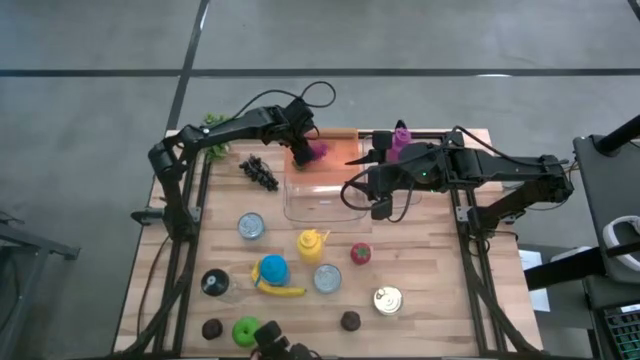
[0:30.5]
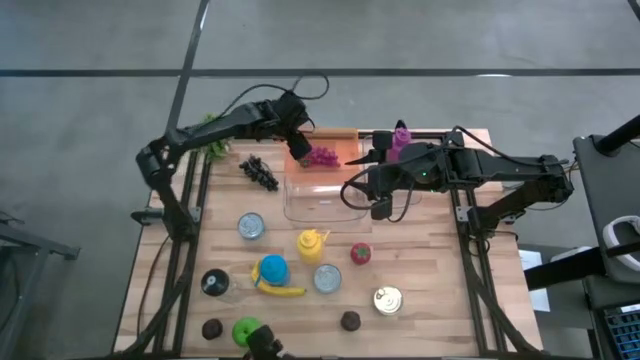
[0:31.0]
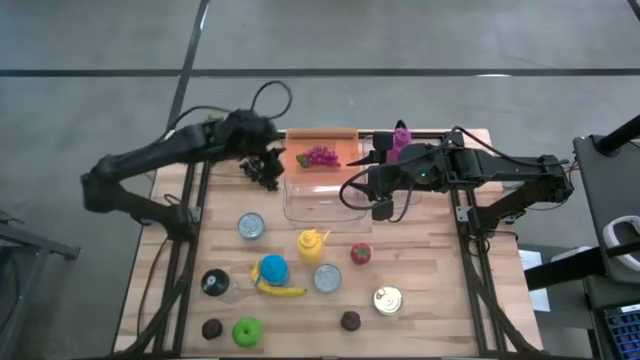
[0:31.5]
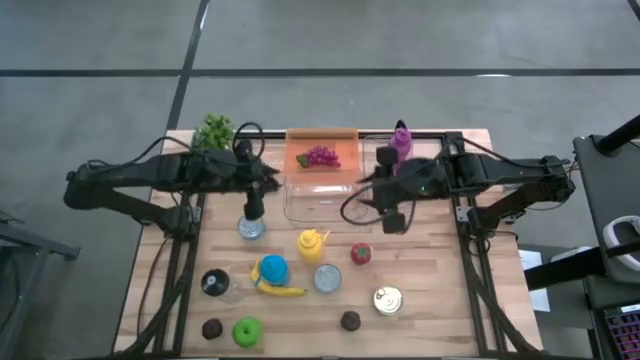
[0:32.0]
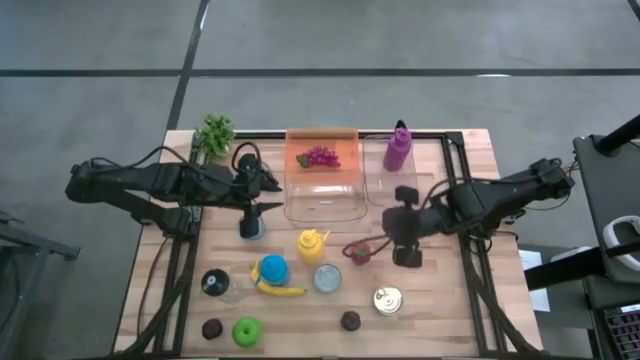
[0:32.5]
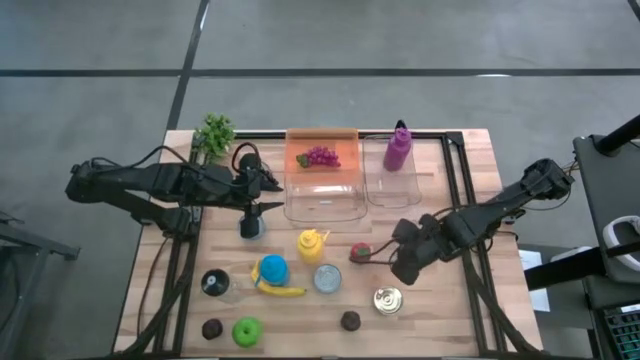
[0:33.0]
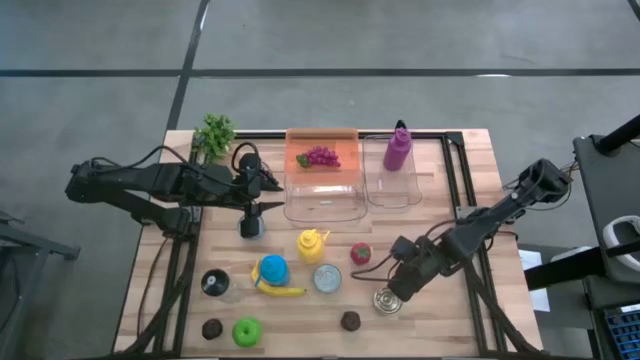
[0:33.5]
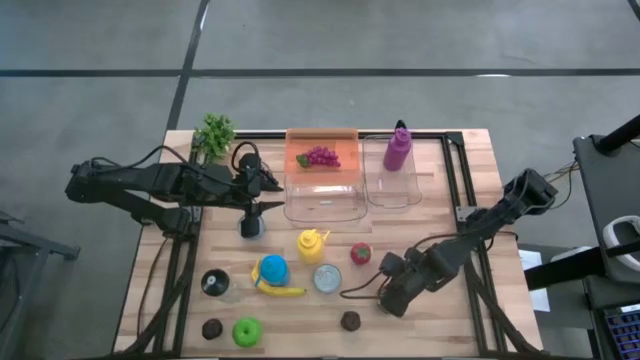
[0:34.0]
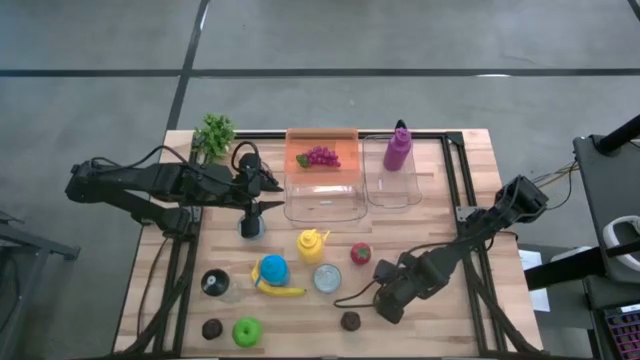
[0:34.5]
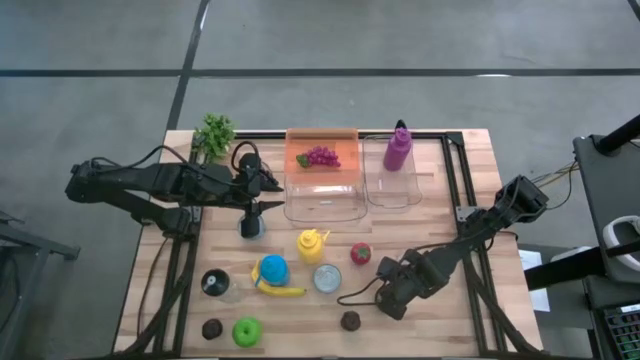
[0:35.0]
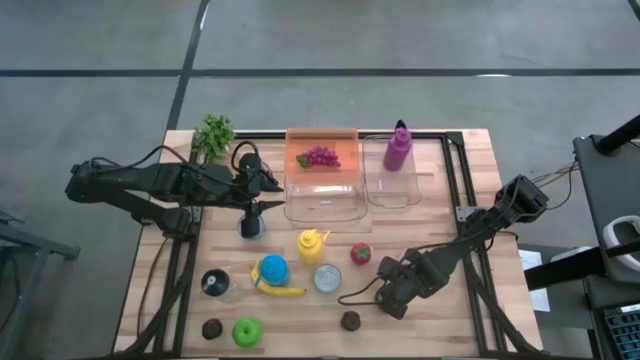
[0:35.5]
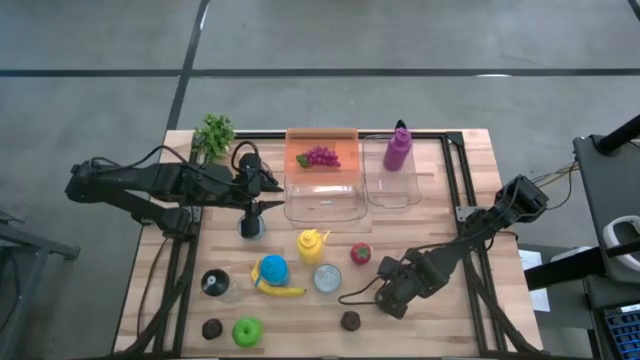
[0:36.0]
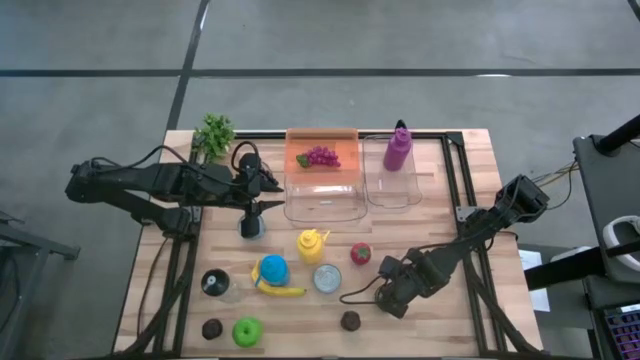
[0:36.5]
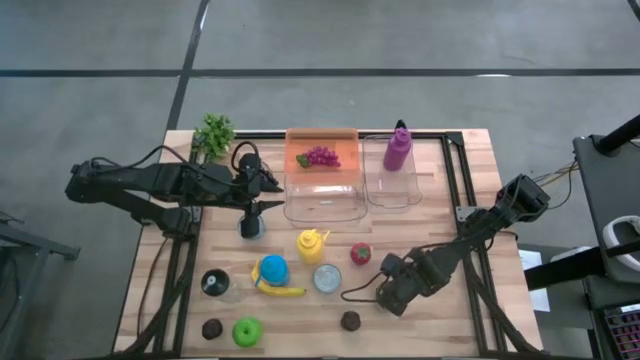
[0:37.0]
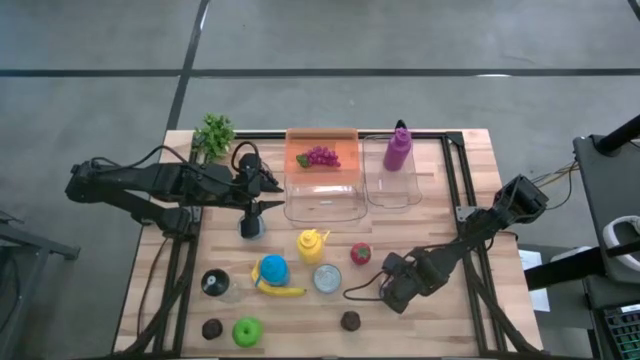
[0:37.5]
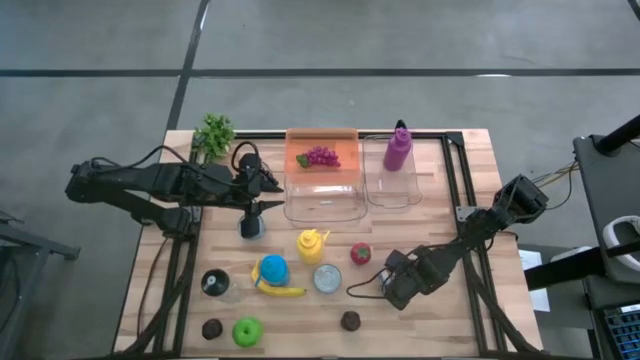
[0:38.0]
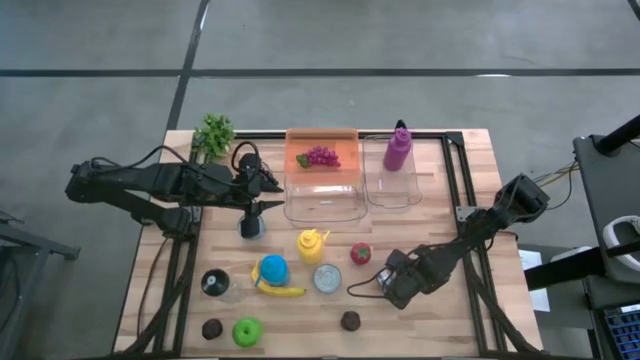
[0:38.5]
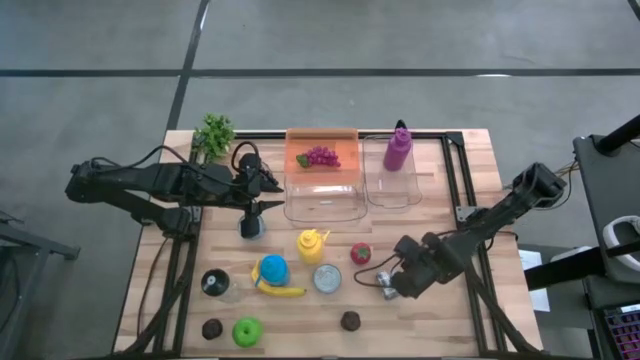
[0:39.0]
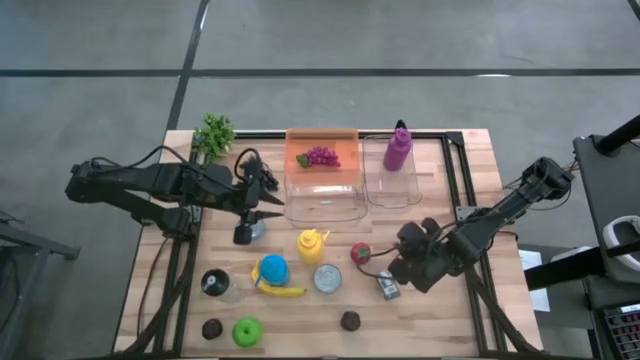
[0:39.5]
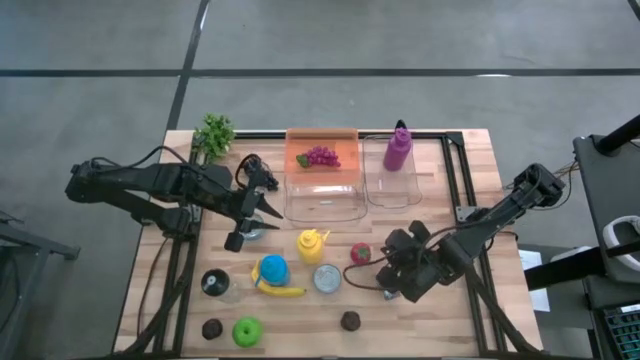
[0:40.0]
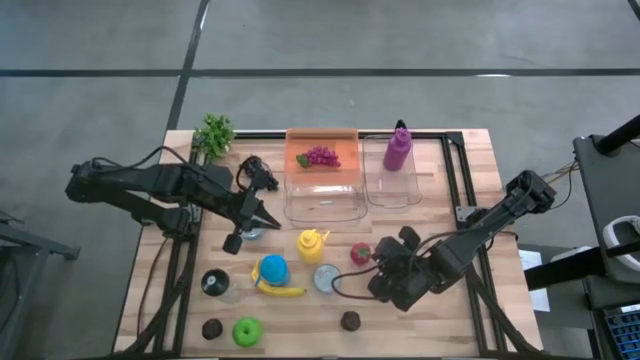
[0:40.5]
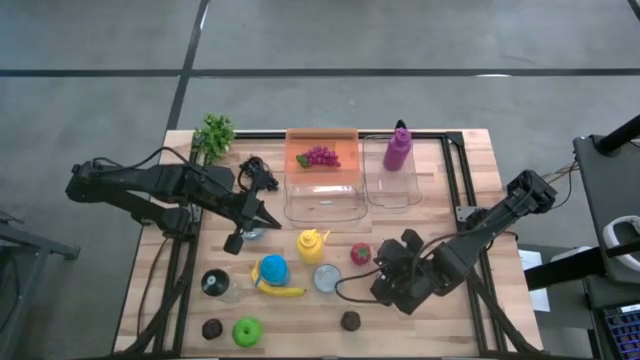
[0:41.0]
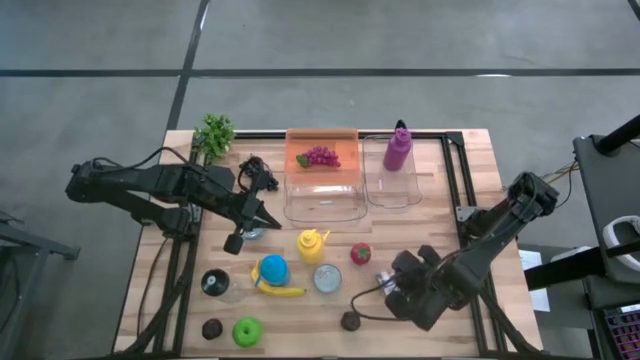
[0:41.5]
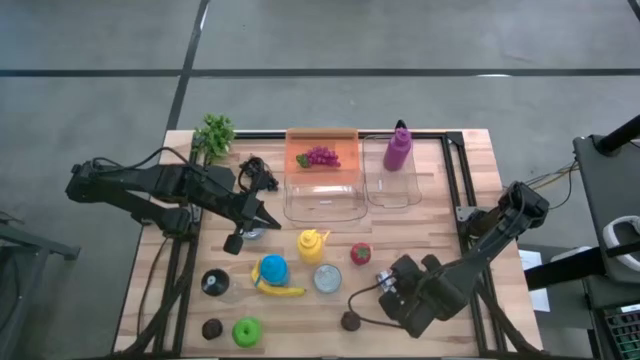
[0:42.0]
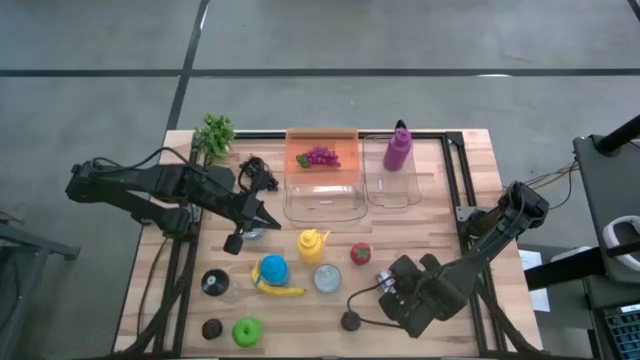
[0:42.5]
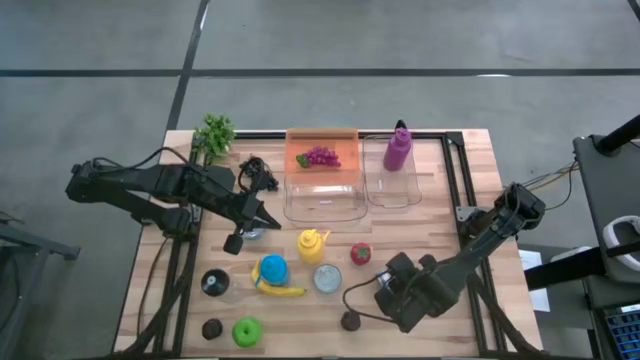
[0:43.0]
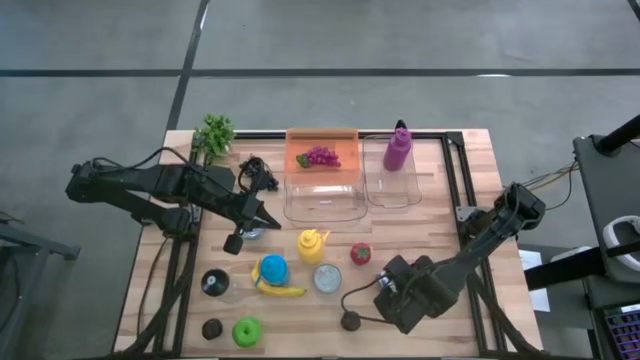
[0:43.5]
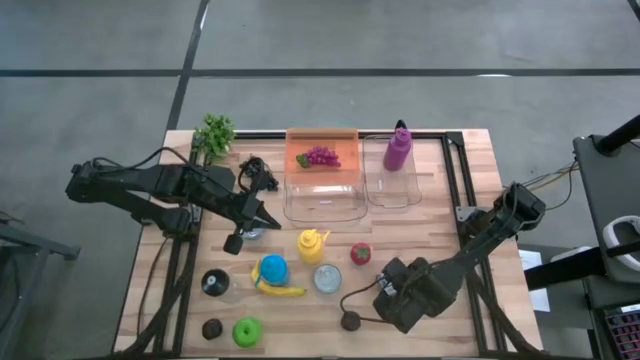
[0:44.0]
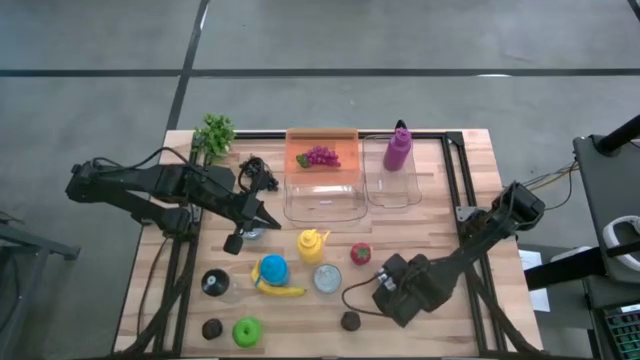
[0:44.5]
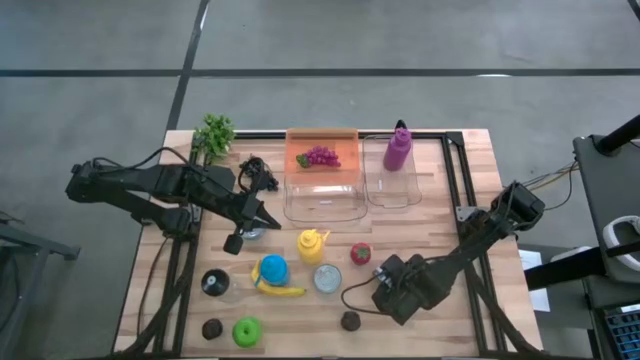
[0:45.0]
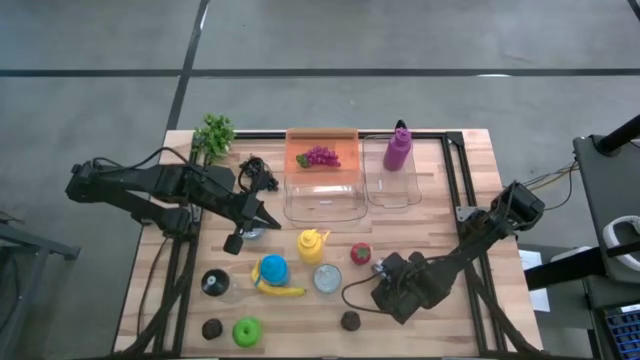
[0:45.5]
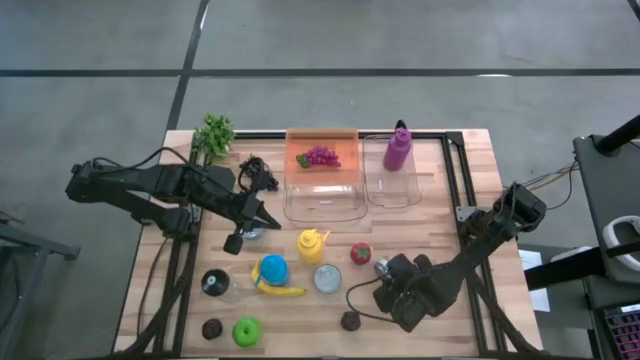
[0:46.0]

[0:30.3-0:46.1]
Task: Pick & Place Food Item
Put the blue and pink can into the left transparent bin

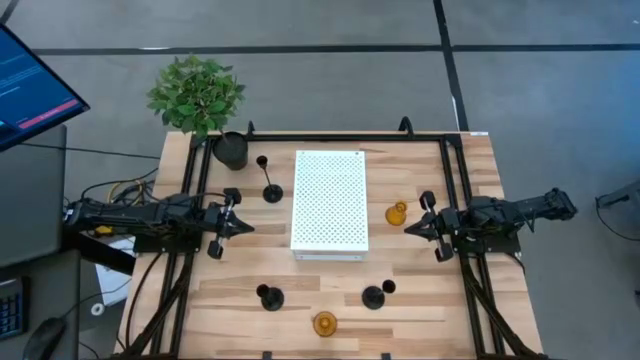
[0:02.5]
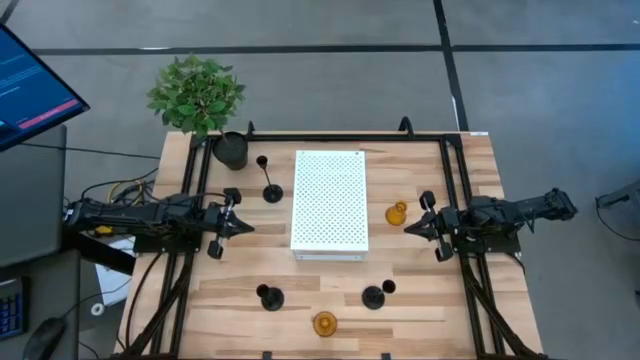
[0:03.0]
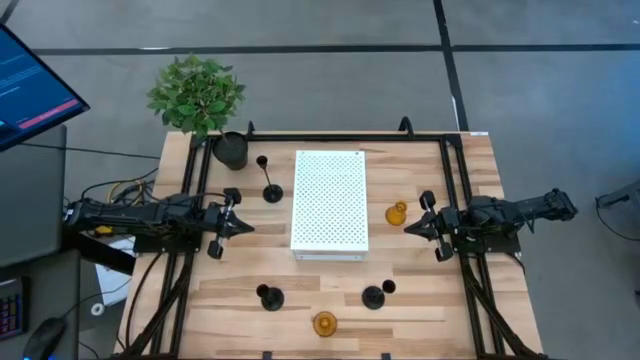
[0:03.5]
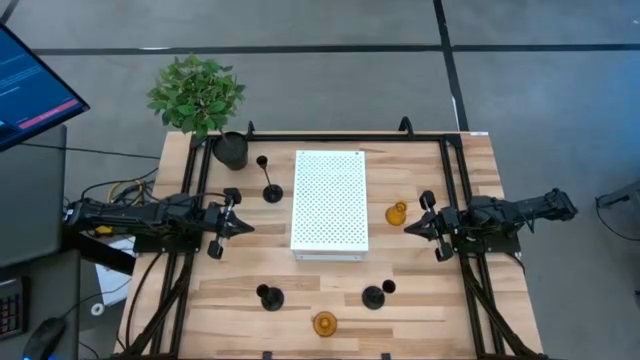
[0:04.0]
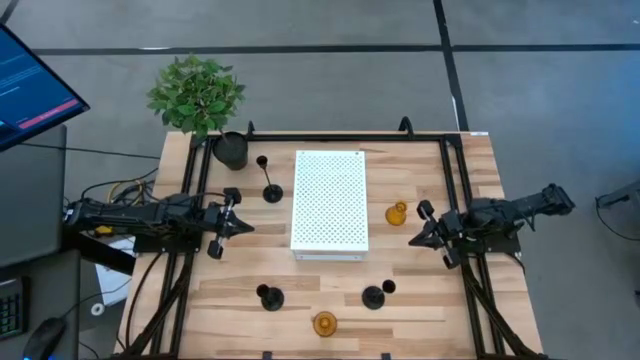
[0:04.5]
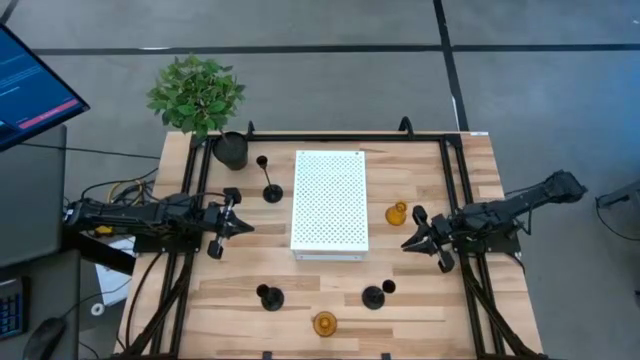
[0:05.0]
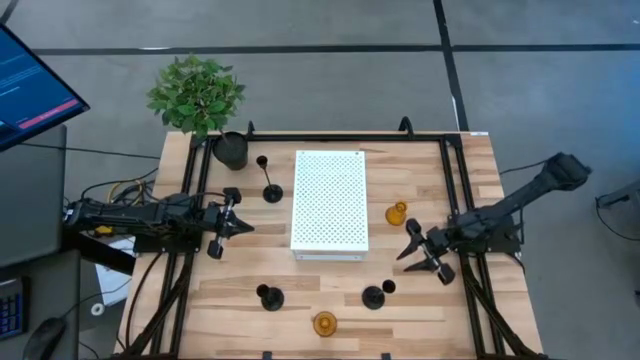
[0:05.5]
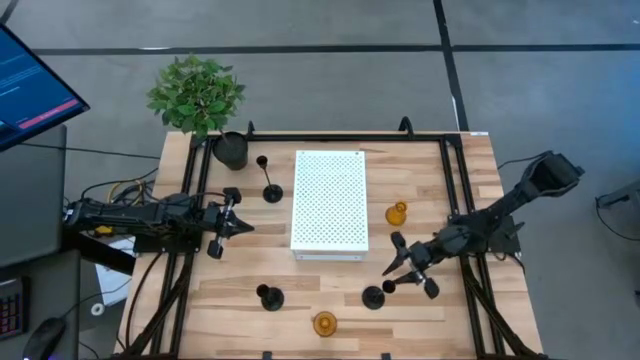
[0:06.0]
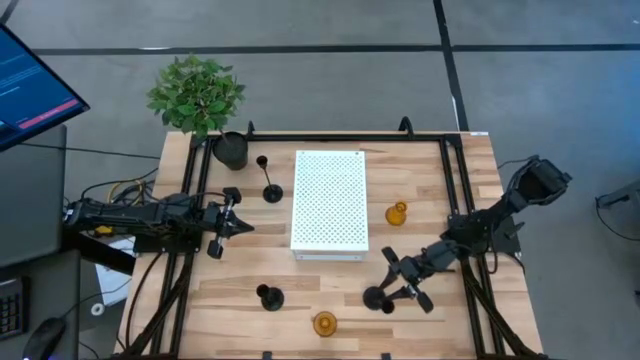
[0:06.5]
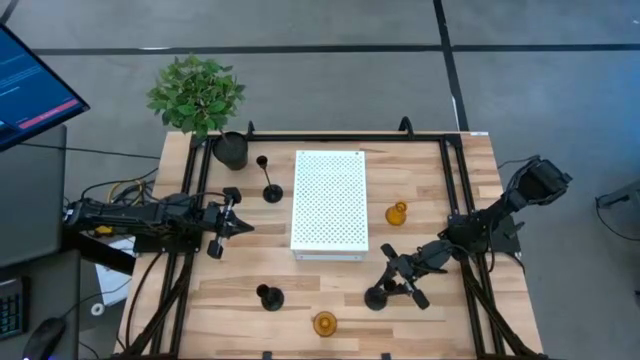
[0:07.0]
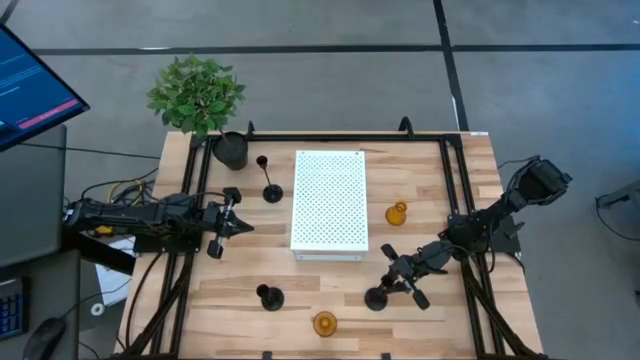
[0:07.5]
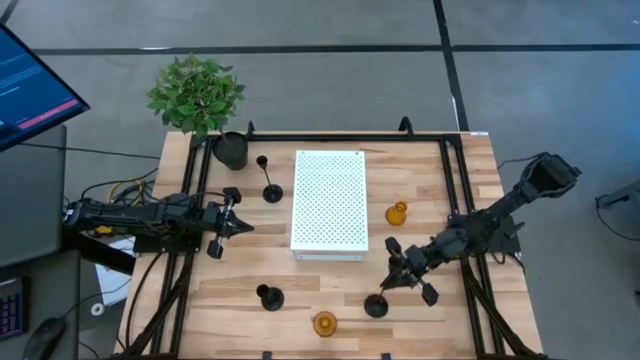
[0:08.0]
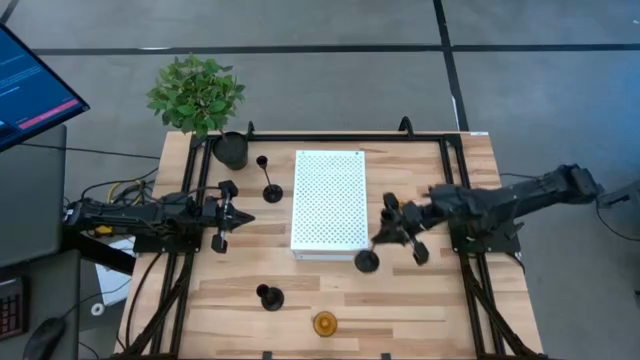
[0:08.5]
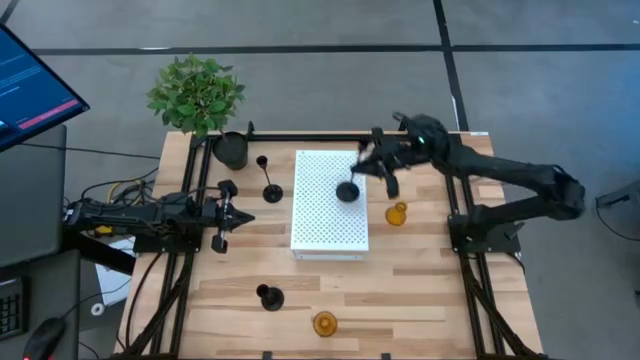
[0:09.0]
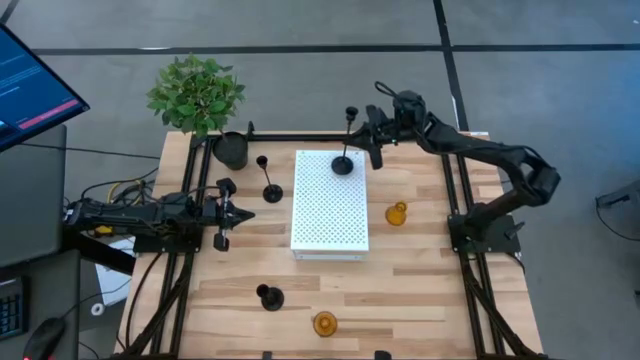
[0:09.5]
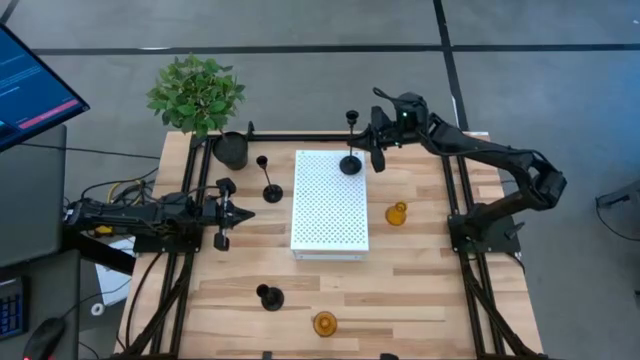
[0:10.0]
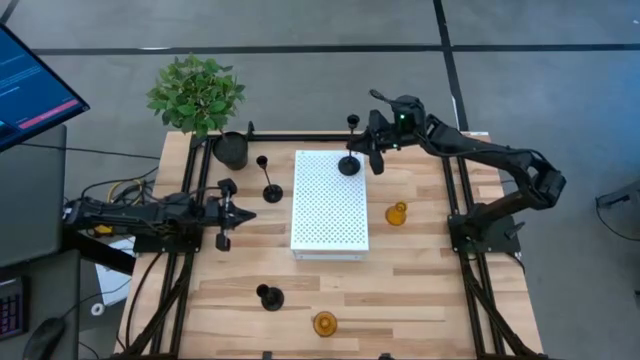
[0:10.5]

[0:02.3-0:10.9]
Task: Pick & Place candle stick holders
Put the bottom right black candle holder on the shelf
